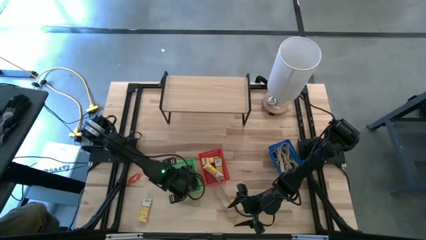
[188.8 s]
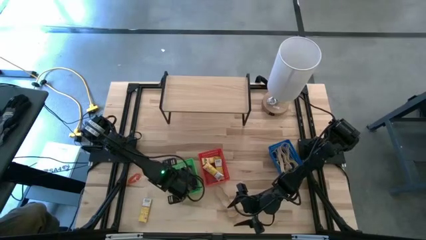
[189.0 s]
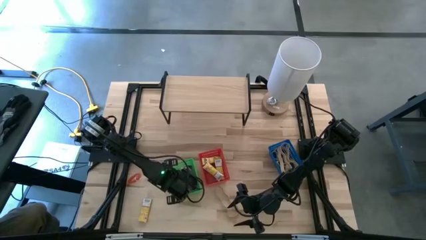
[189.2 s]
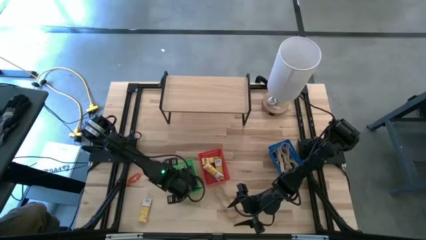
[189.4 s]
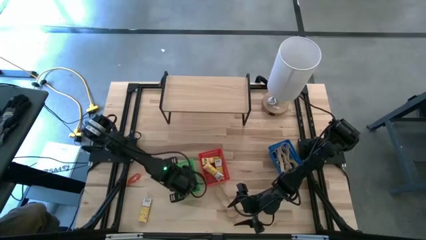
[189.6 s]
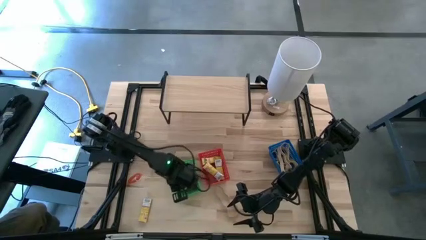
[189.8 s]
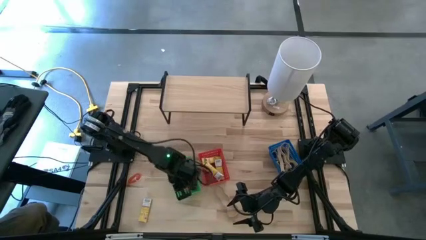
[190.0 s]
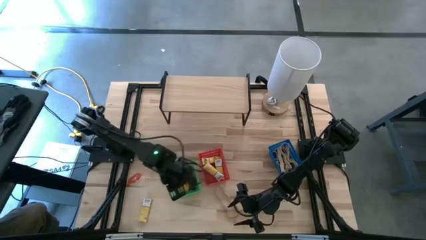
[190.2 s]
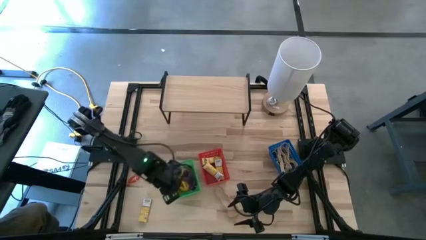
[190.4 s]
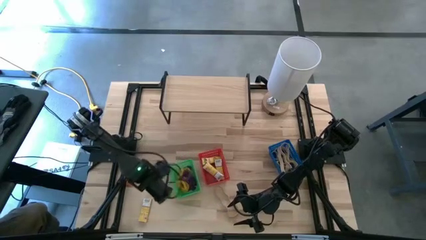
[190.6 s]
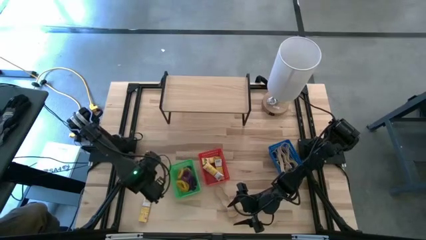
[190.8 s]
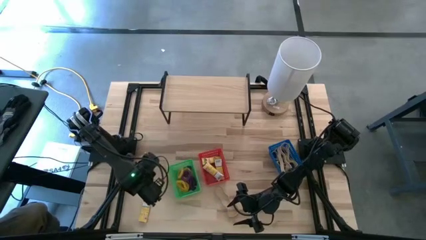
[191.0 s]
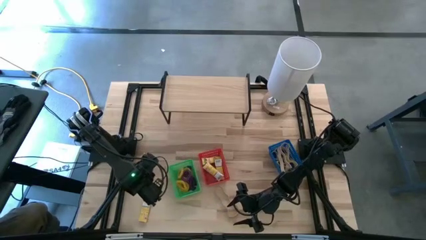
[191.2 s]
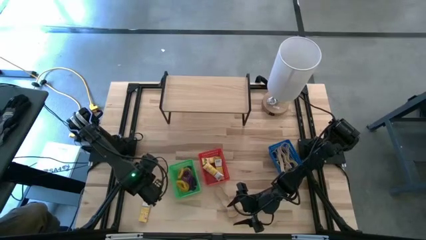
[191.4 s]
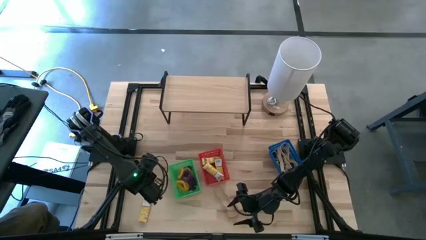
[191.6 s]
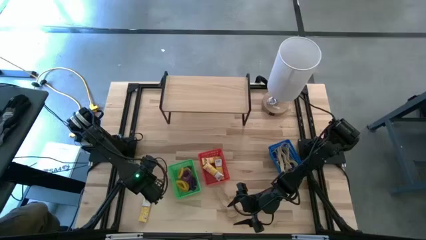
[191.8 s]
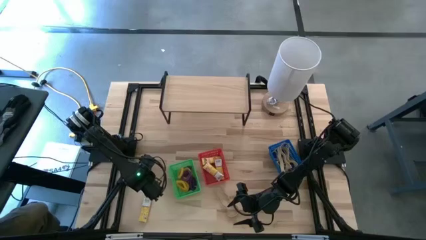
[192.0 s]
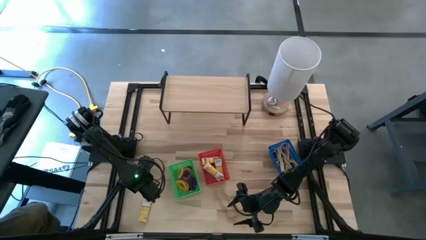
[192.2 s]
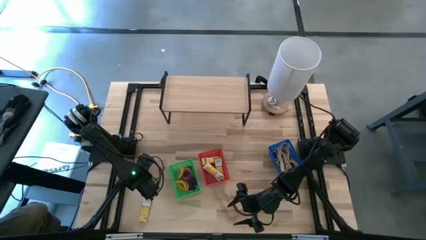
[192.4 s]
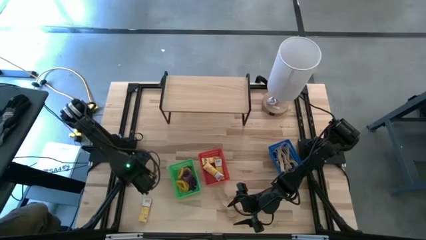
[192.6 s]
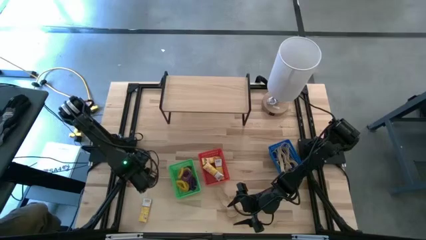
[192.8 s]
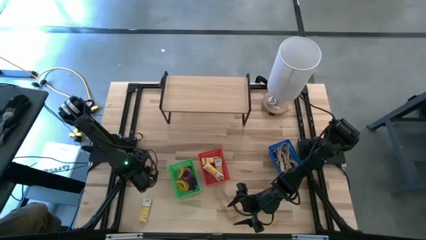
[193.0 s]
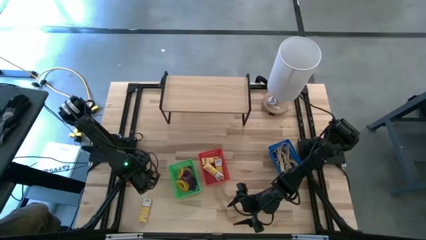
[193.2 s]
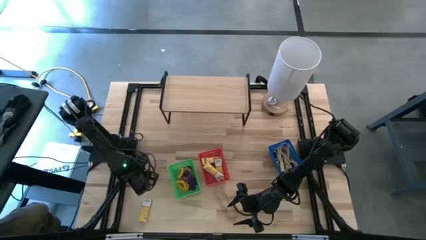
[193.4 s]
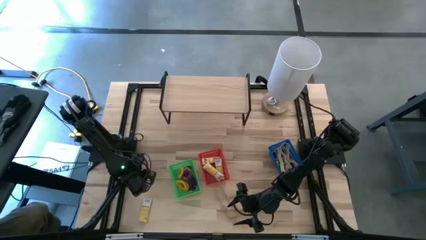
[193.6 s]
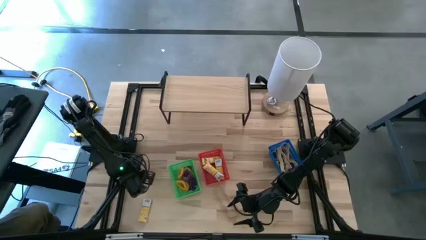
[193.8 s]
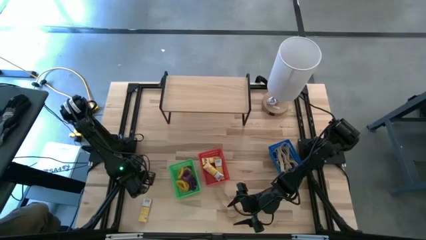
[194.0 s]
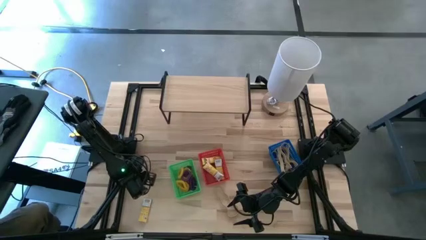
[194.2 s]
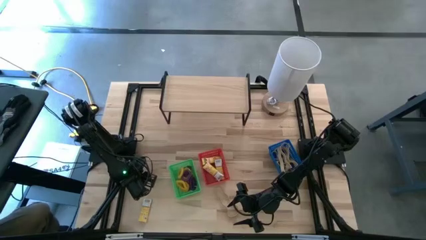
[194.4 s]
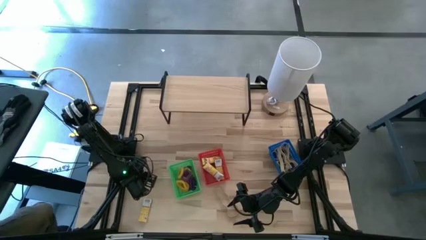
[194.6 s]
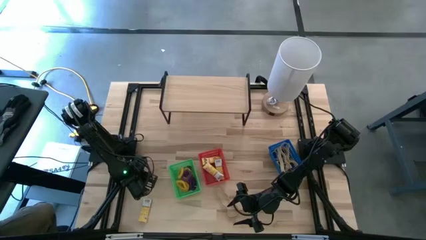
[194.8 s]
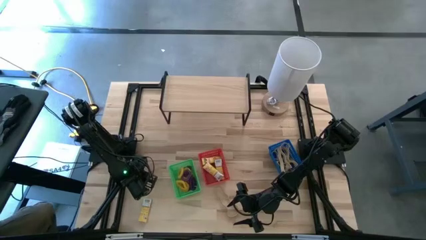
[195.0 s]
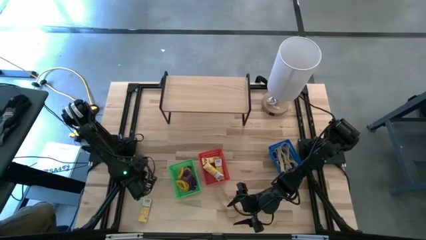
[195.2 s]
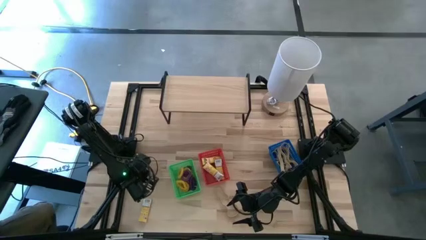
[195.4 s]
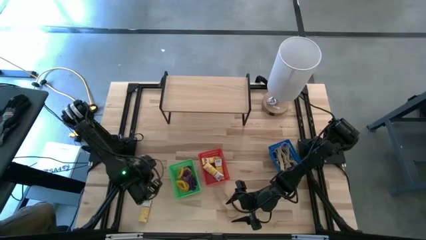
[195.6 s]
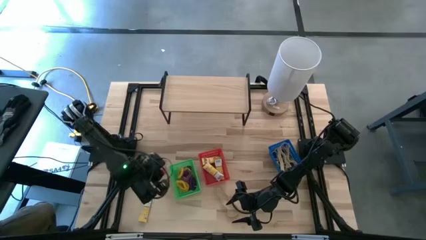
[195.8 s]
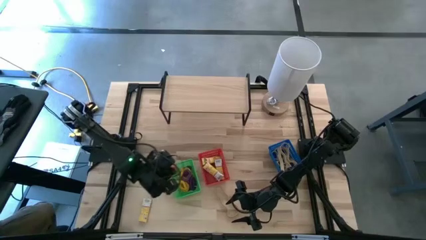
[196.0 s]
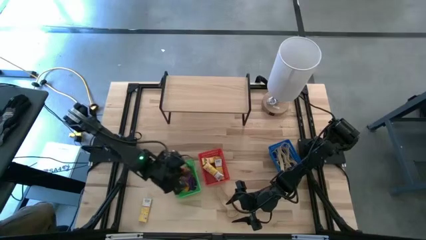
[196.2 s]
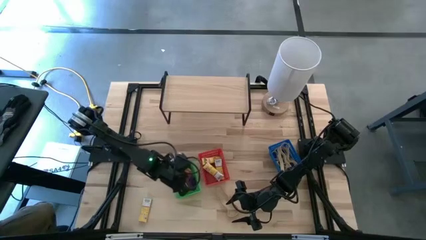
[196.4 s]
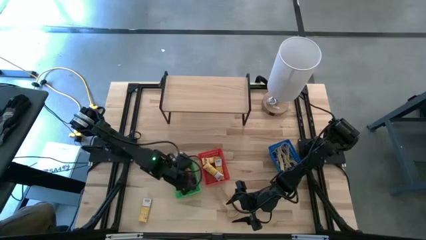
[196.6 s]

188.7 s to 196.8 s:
Task: Pick & Place Office Desk Supplies
Put the orange spring keychain into the green bin

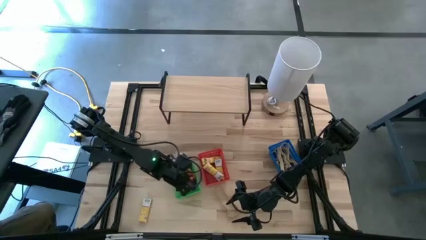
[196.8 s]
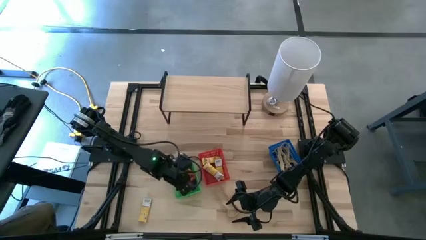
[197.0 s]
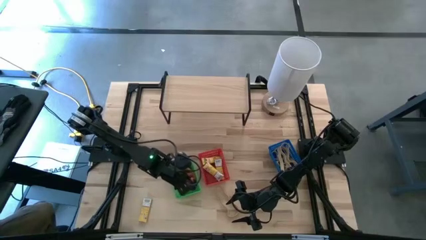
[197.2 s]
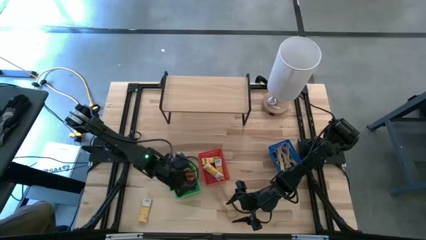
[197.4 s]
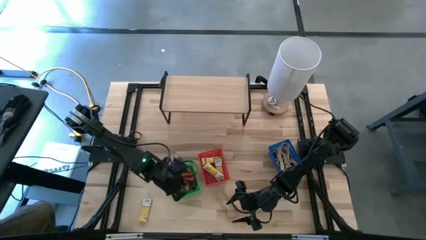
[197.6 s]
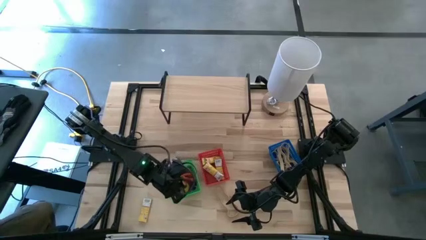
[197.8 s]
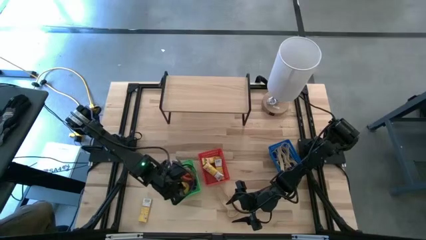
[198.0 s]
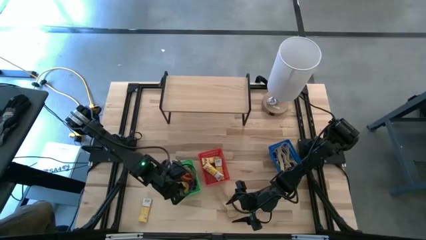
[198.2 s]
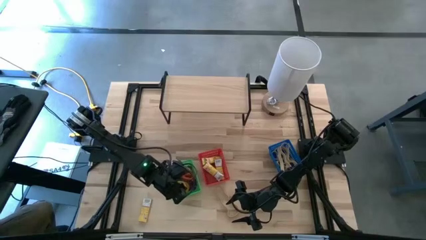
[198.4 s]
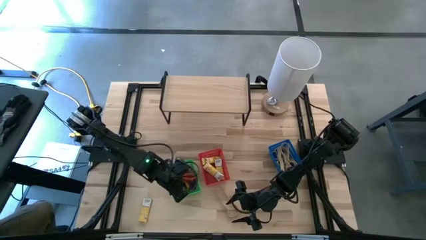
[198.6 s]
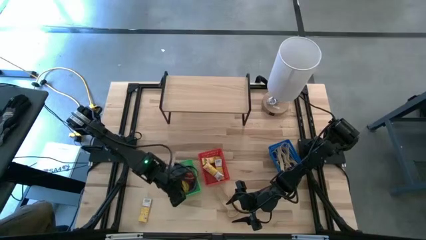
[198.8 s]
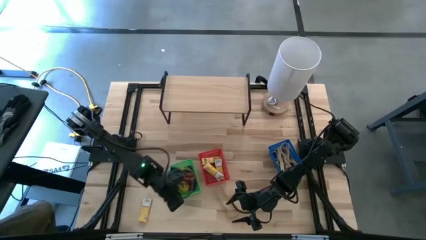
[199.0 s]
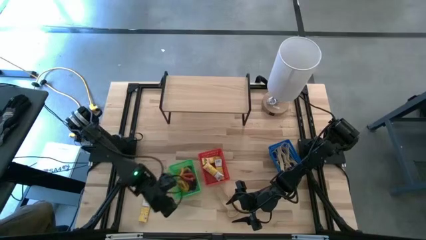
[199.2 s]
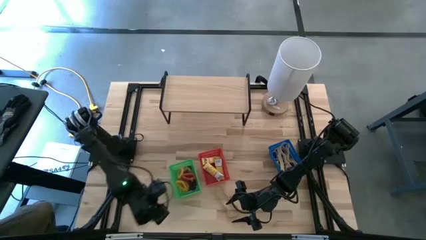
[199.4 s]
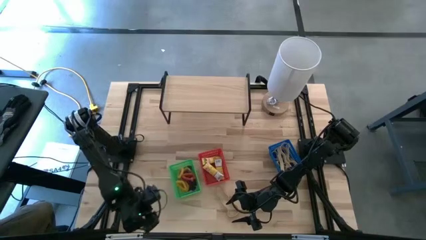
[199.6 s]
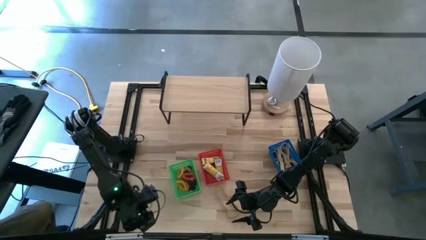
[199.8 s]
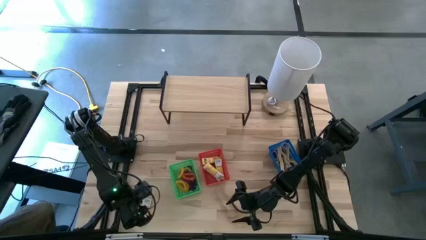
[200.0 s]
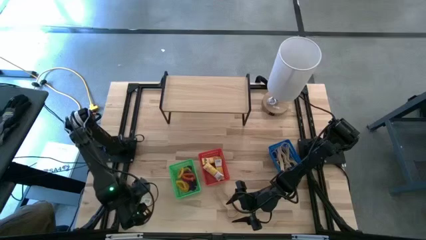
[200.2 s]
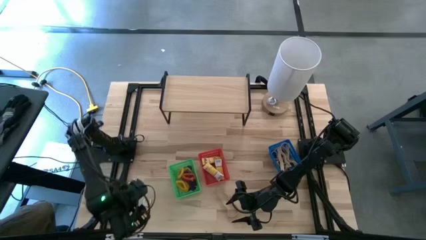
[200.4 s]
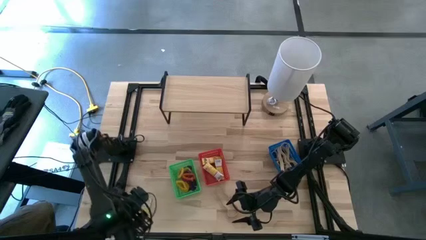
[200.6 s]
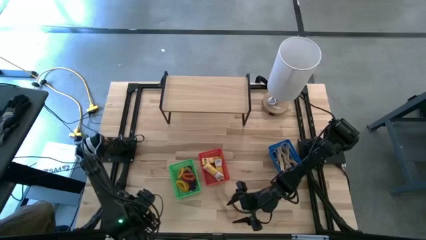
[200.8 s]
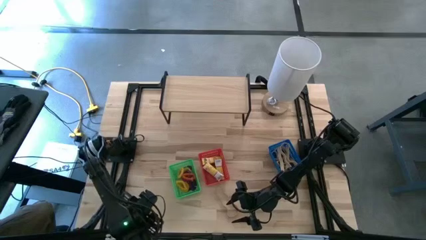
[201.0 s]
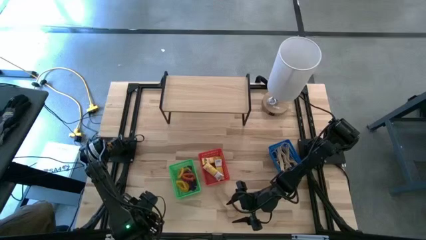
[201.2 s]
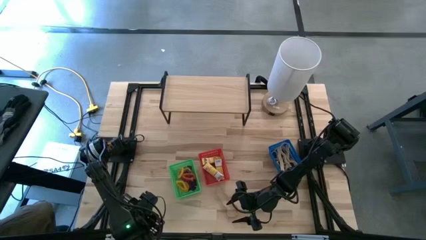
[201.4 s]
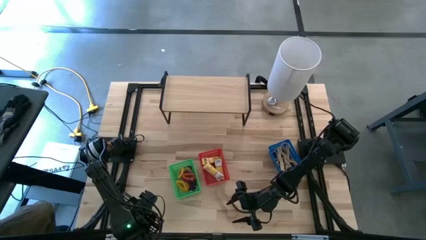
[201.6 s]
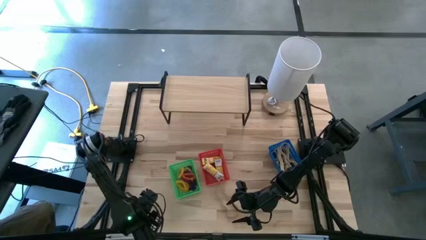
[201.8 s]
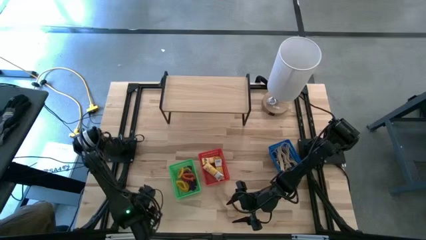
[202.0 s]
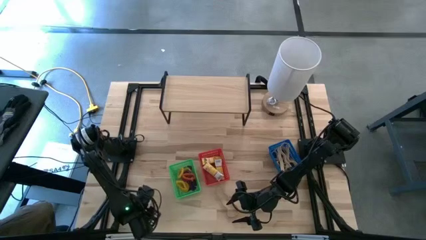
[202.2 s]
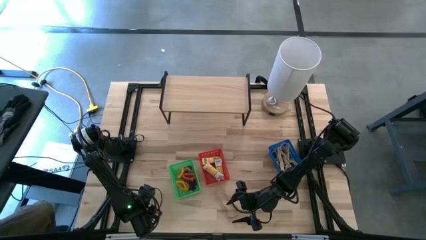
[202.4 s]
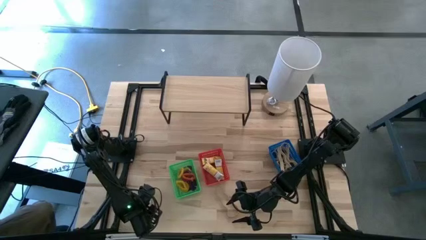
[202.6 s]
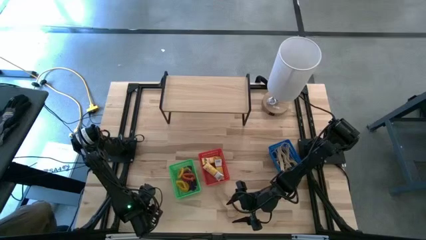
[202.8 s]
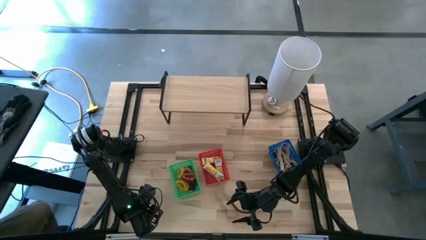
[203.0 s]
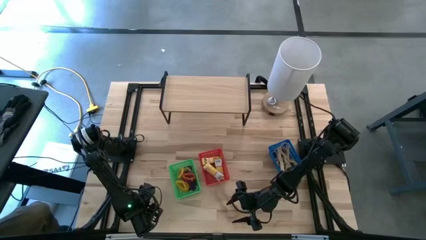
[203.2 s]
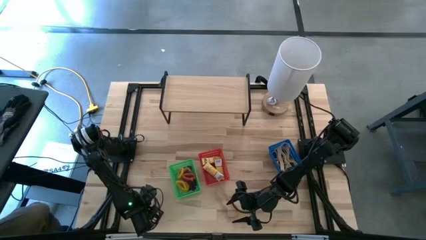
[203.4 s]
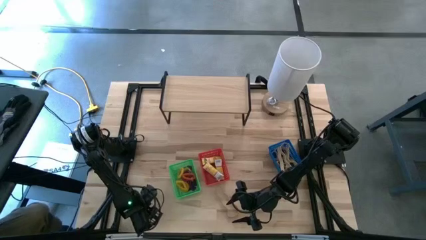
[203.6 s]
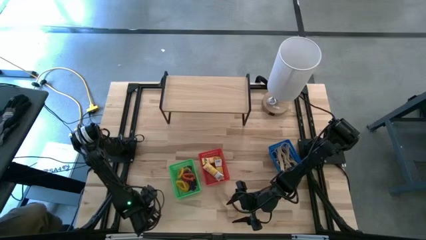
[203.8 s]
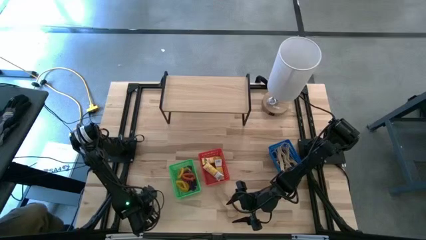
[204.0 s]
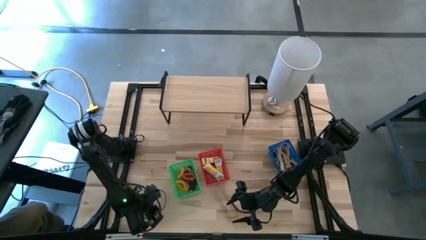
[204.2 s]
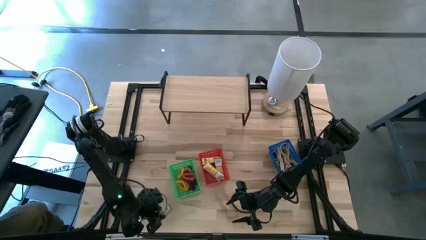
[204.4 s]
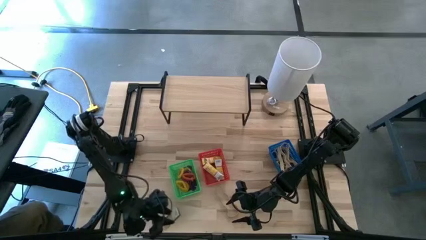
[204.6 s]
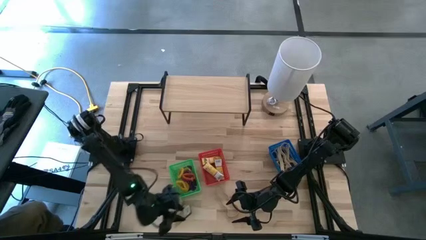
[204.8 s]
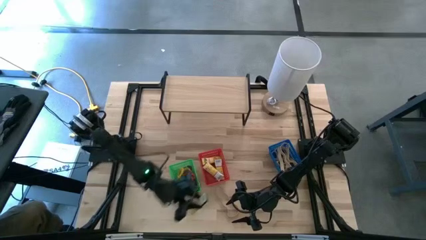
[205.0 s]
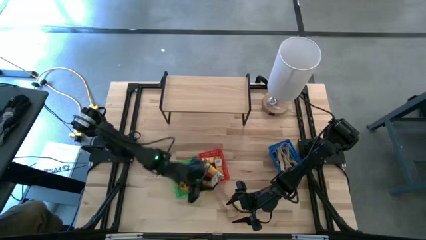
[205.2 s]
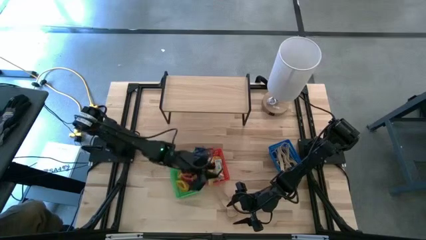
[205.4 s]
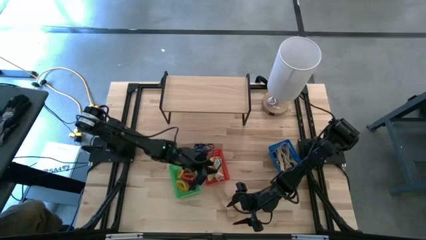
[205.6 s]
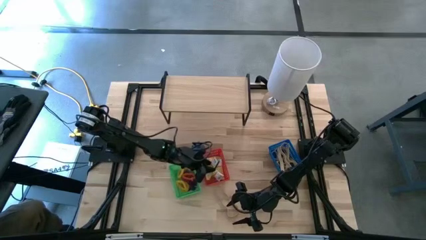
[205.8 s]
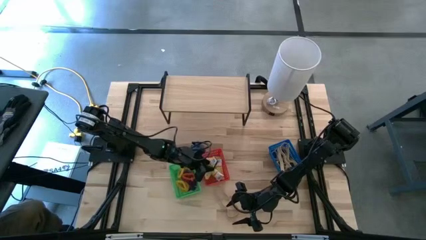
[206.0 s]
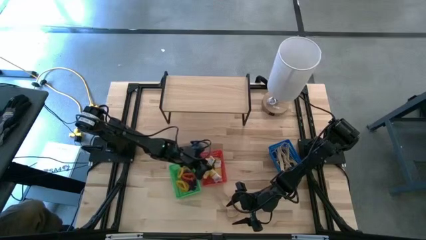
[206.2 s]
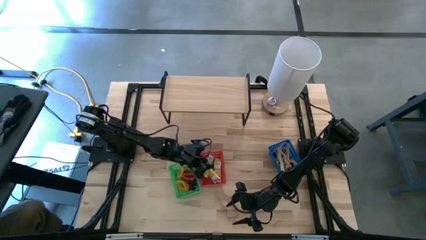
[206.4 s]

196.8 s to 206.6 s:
Put the yellow crayon box into the red bin
